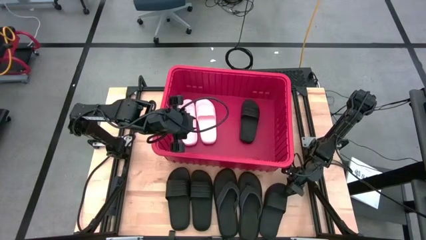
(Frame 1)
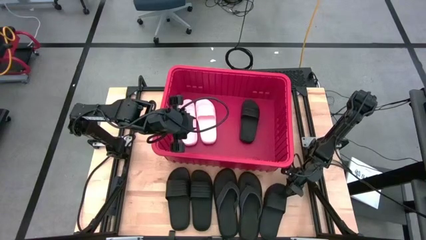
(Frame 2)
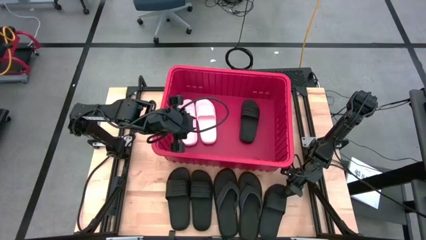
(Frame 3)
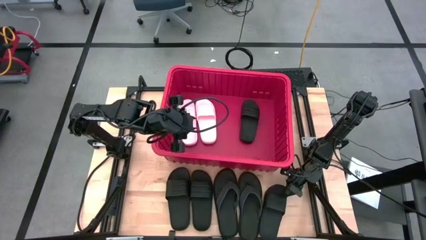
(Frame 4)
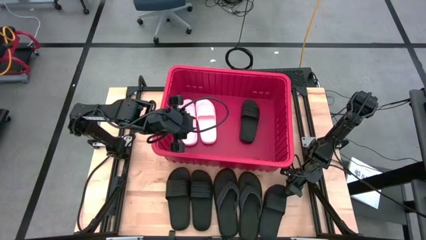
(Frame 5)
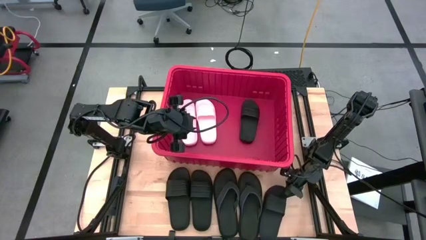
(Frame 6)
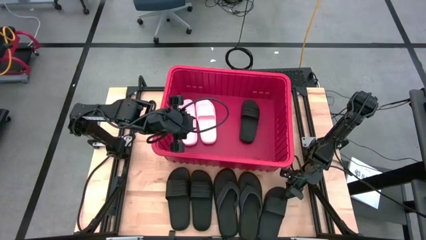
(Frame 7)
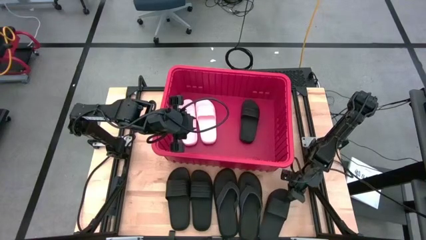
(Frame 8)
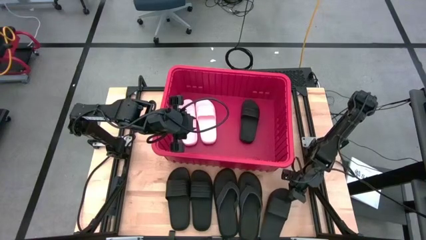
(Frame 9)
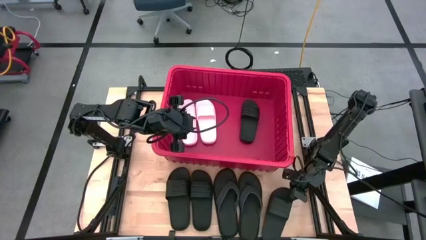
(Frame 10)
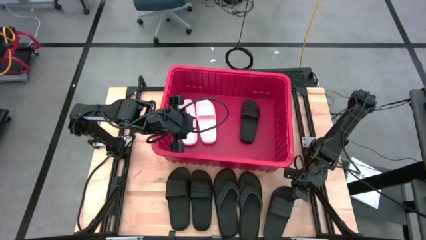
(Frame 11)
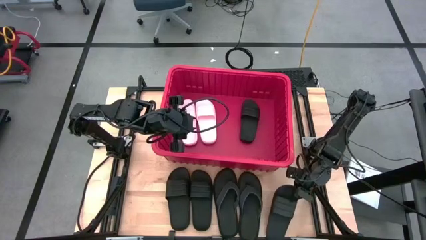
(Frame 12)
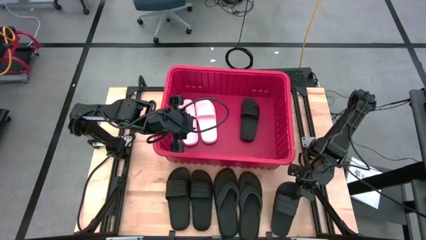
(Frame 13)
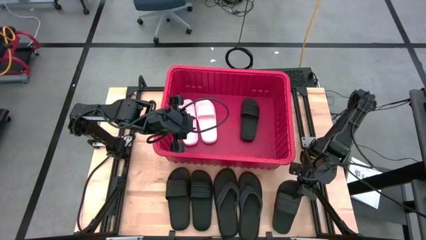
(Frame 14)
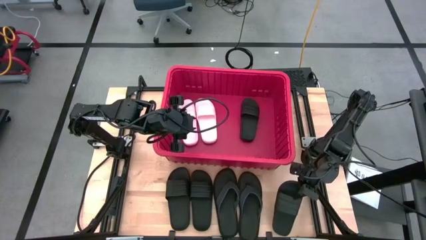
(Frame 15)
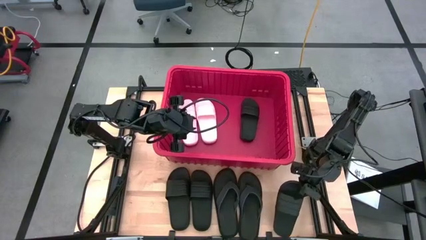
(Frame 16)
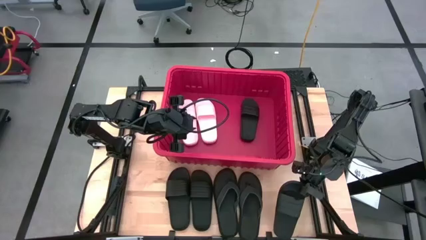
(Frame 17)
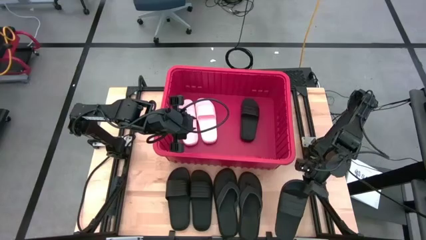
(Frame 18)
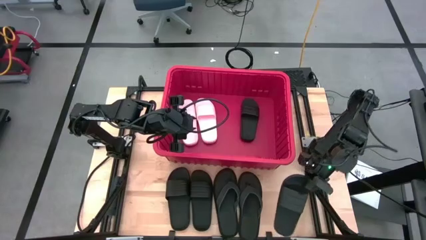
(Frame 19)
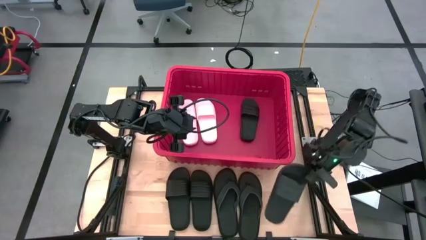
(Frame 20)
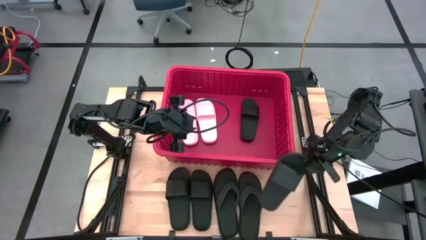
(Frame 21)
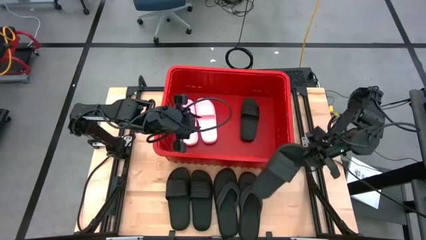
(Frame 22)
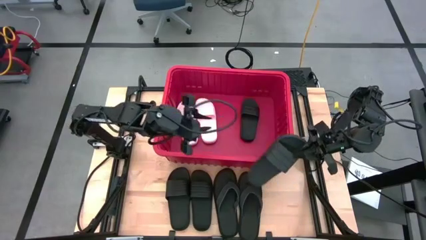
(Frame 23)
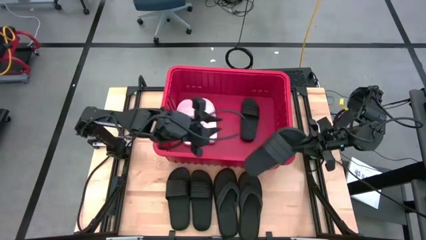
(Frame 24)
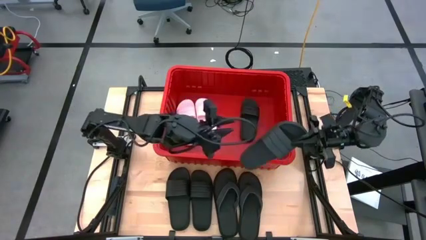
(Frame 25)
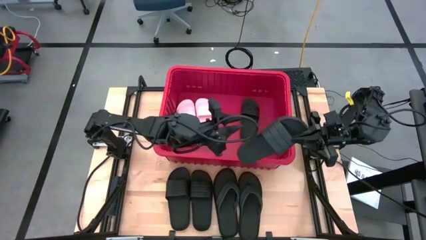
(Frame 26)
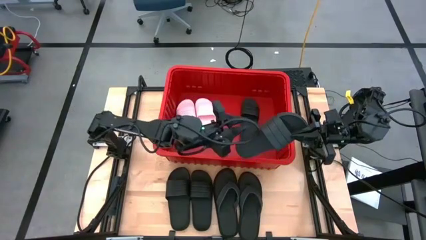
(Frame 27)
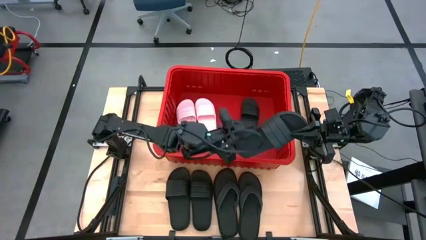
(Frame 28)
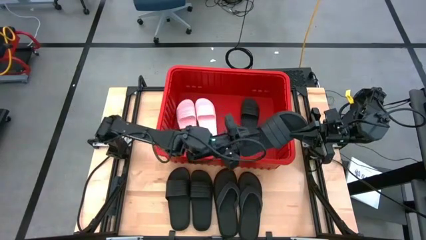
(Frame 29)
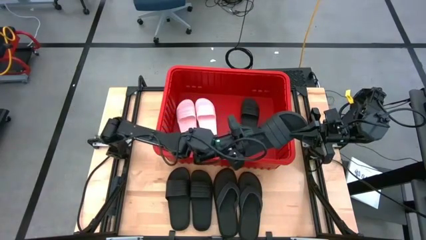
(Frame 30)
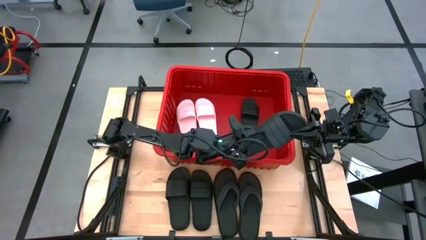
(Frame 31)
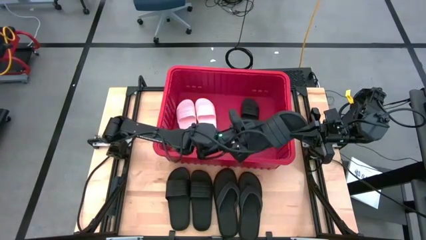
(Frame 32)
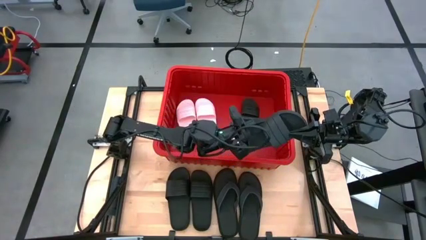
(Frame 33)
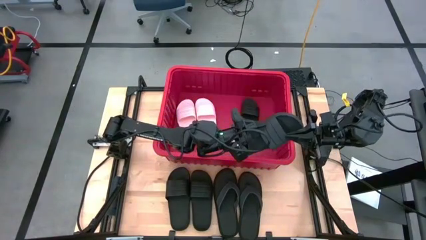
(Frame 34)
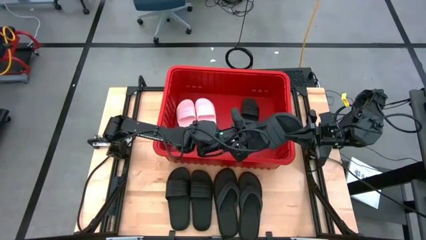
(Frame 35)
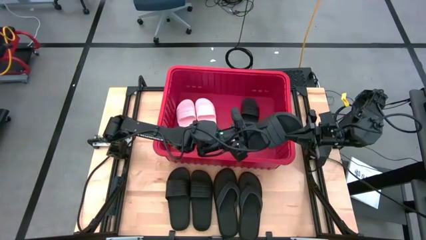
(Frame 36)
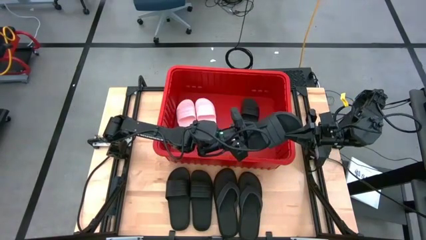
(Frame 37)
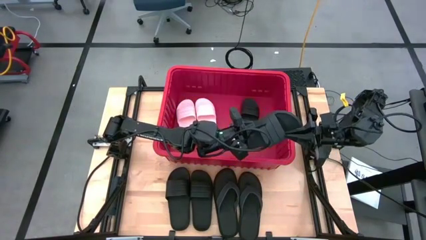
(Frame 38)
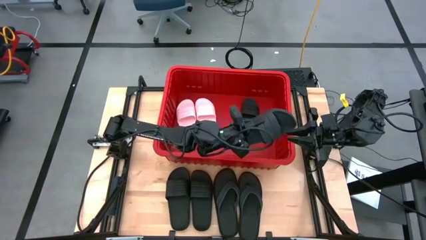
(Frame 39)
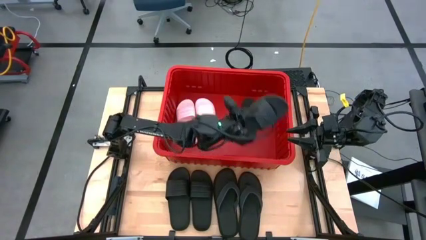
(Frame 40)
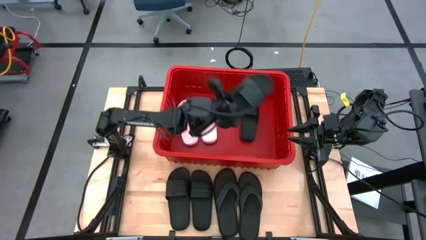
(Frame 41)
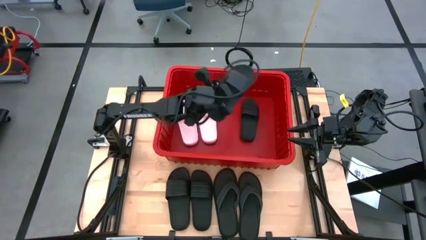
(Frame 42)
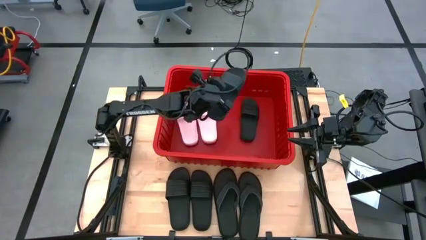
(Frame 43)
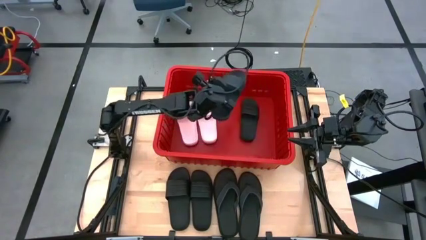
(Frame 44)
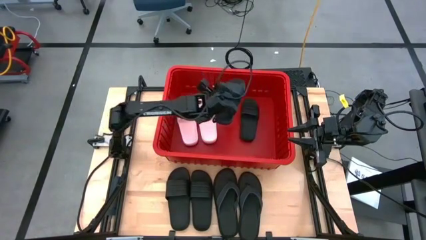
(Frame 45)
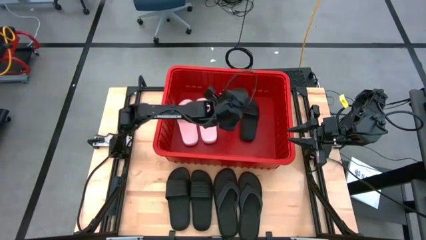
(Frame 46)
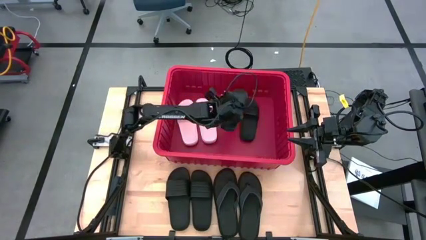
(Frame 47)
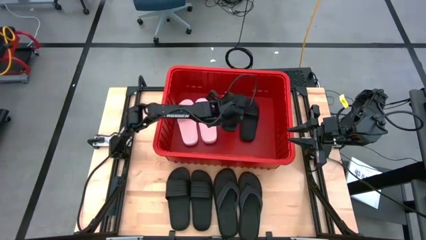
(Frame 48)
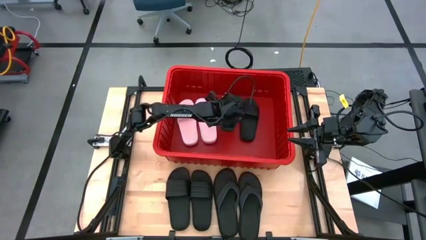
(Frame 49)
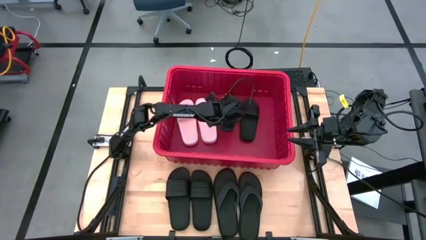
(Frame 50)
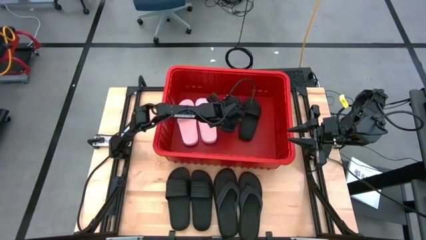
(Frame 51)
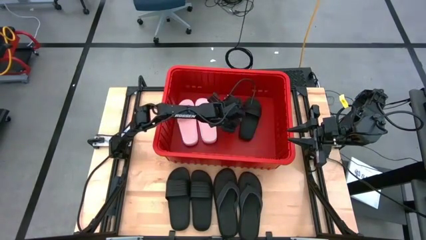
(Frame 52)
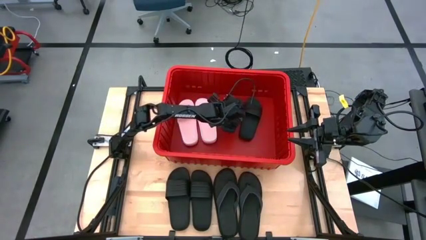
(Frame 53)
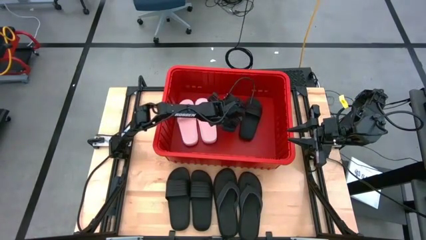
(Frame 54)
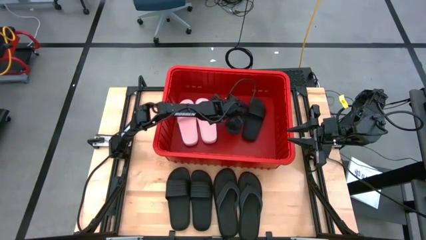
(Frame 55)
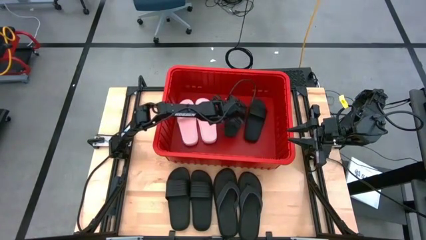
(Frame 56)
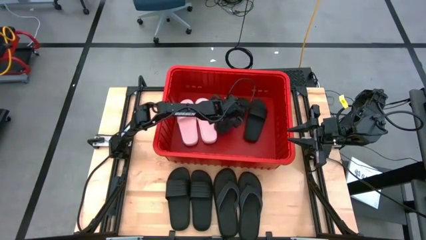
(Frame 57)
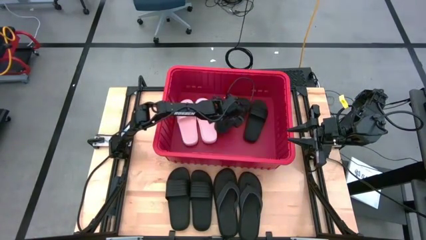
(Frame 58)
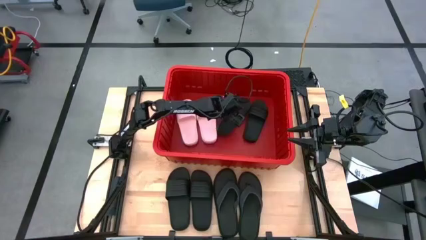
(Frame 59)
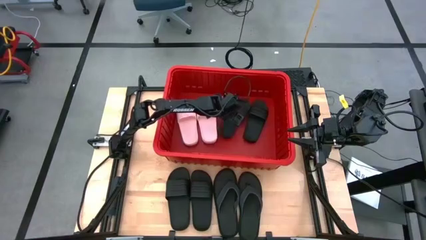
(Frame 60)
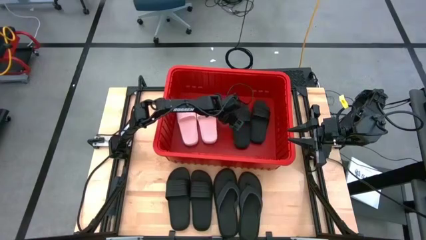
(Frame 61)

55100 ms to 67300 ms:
Task: Pick and place slides into bin
Put the right black slide into the bin

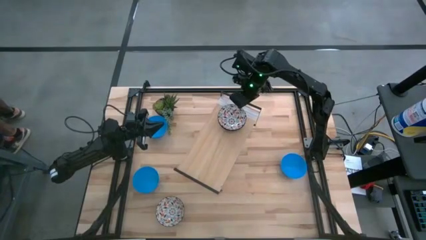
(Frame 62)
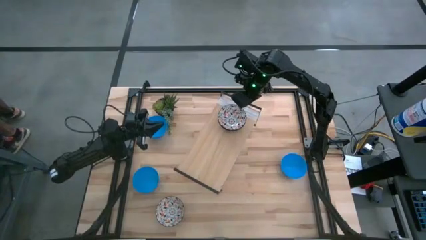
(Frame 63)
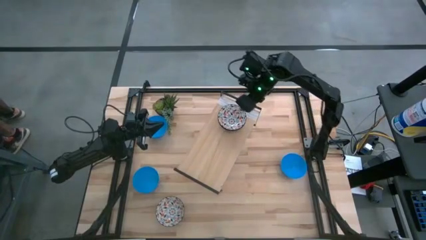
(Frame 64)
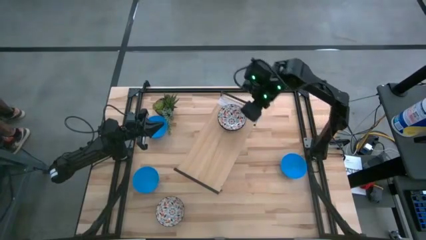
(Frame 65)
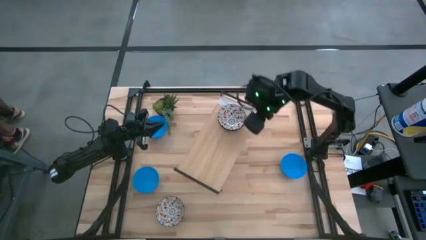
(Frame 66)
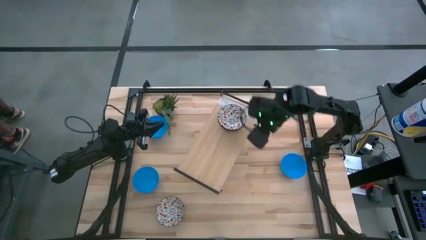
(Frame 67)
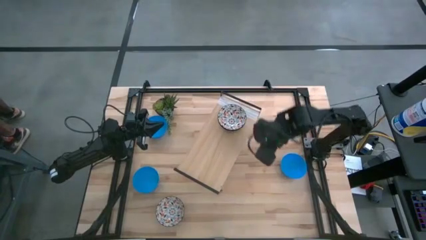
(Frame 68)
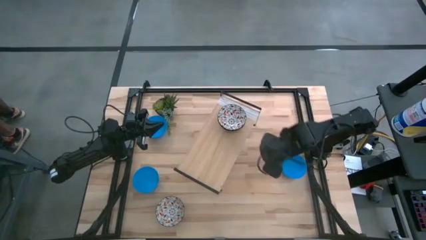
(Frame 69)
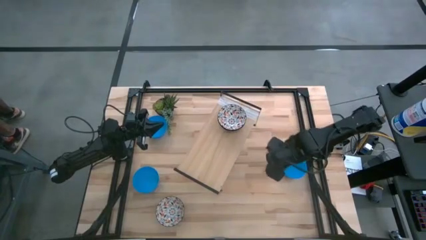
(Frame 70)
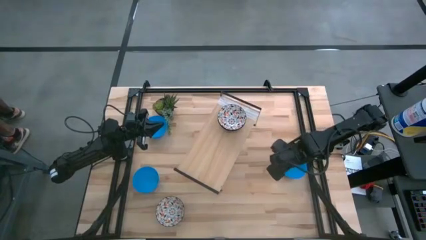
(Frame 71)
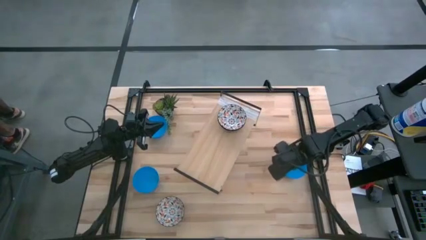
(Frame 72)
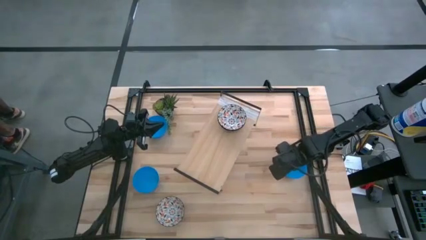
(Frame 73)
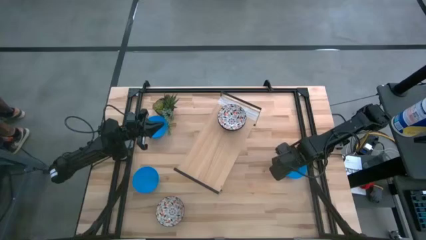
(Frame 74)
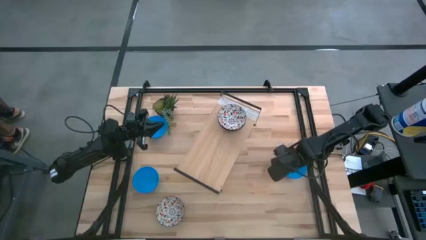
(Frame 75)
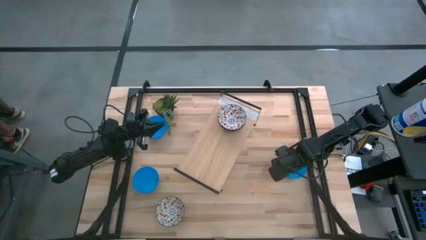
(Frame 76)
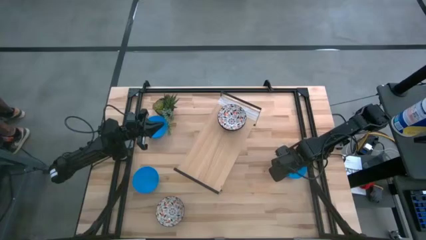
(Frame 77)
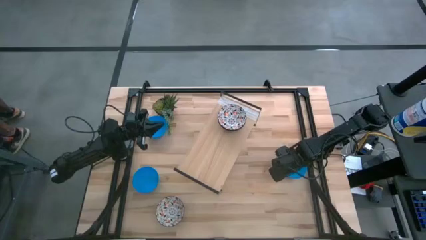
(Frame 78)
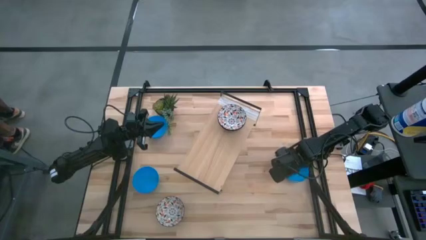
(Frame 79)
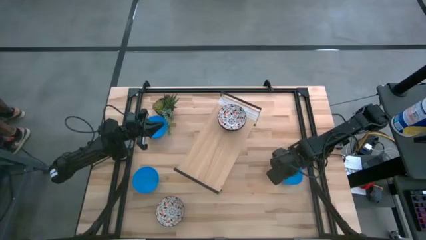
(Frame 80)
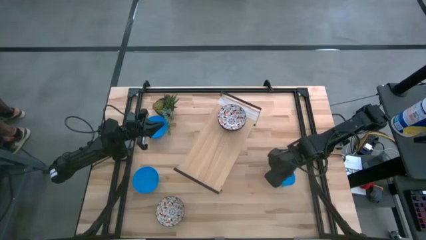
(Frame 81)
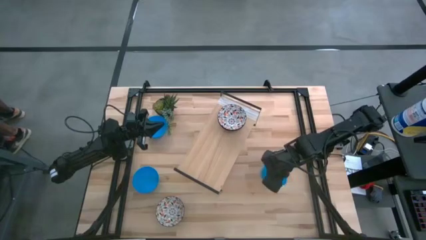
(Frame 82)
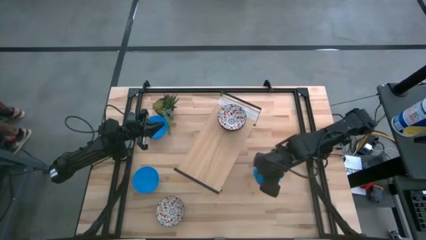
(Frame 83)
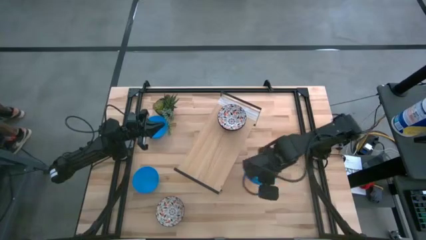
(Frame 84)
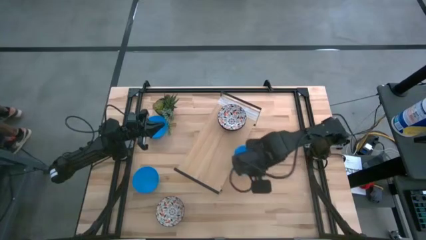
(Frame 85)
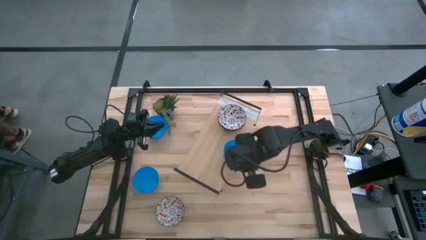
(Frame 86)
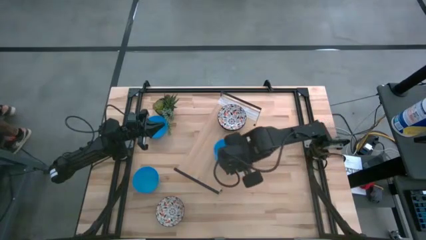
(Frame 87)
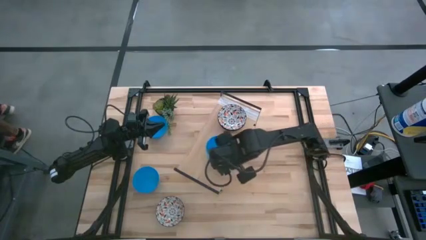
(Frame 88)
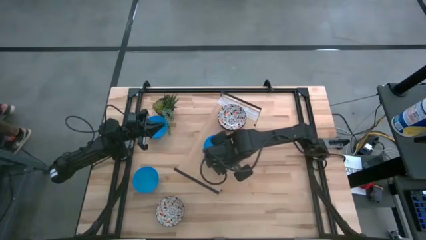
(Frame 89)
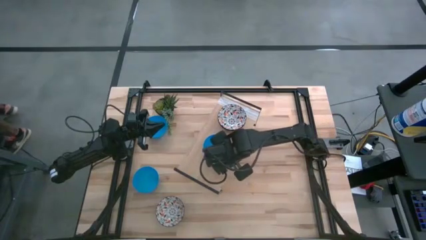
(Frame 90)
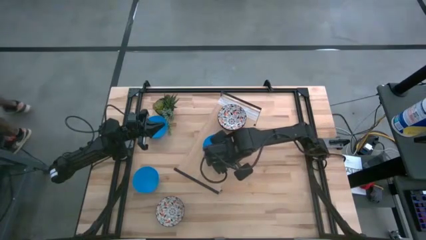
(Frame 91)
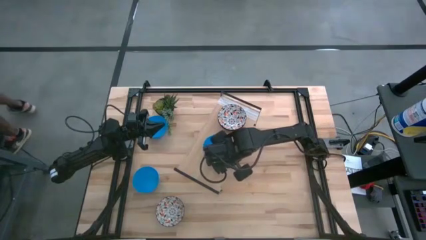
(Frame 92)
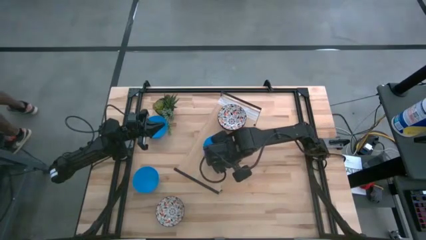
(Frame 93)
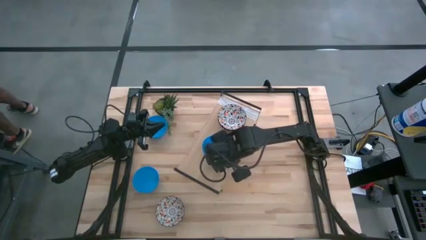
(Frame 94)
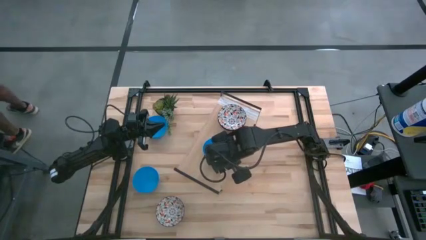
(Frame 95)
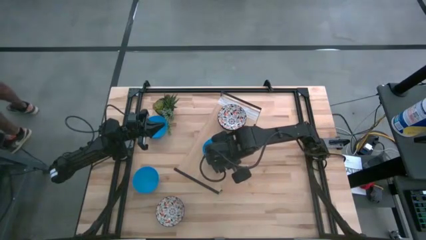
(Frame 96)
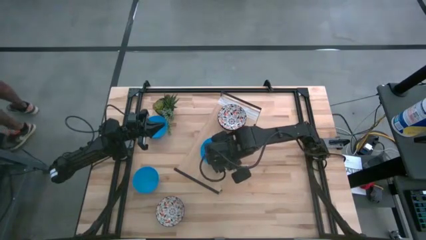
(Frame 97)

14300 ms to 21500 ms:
Task: Pick & Place Mini bowls
Put the bottom right blue bowl on the shelf
